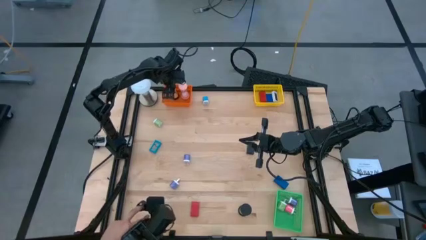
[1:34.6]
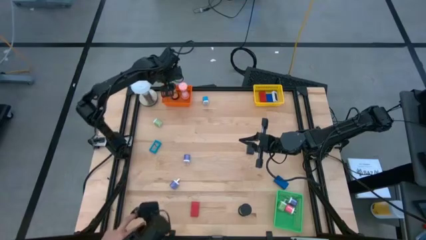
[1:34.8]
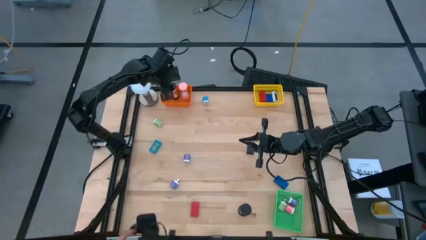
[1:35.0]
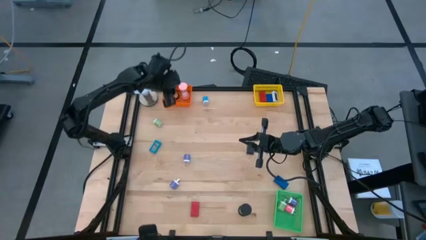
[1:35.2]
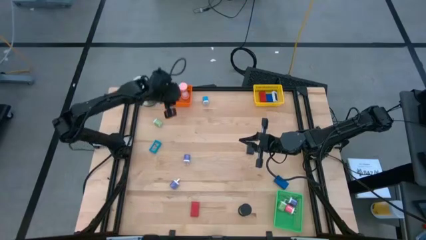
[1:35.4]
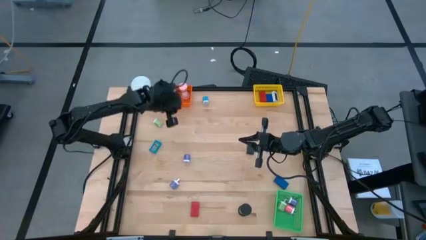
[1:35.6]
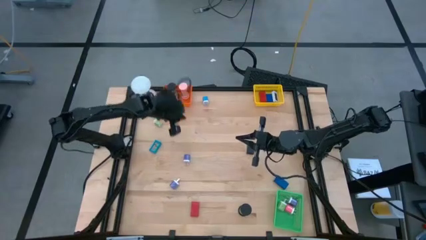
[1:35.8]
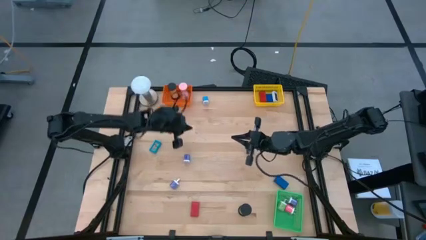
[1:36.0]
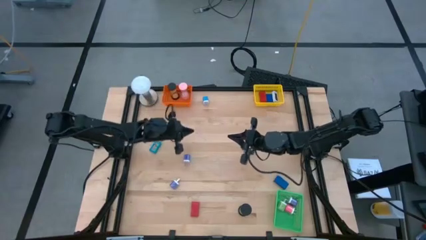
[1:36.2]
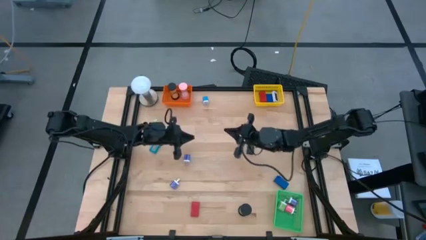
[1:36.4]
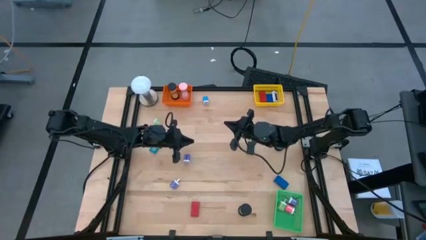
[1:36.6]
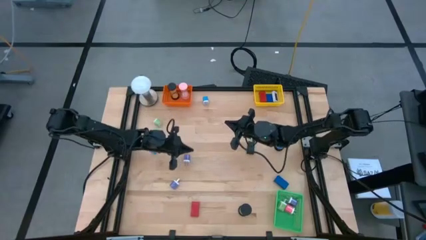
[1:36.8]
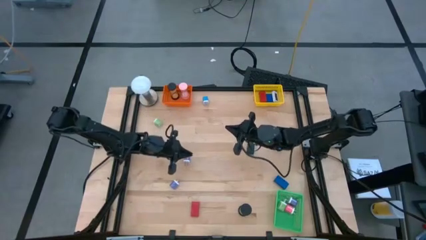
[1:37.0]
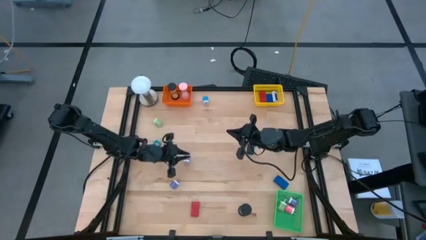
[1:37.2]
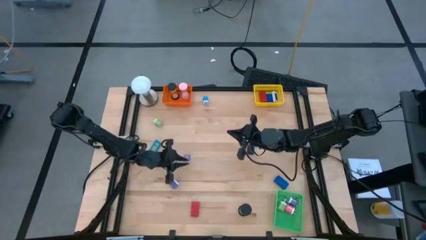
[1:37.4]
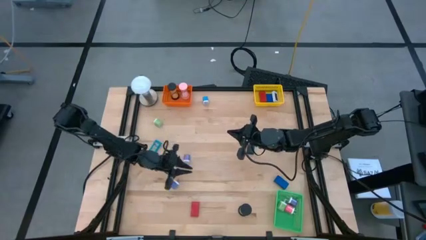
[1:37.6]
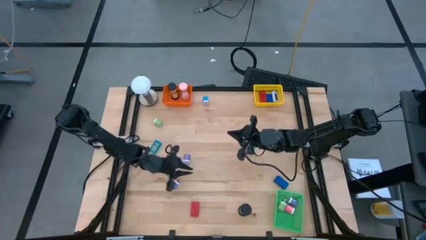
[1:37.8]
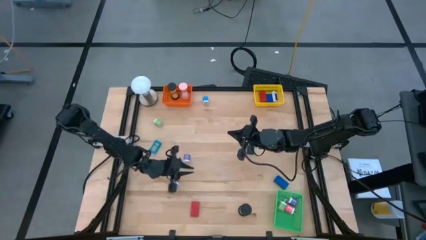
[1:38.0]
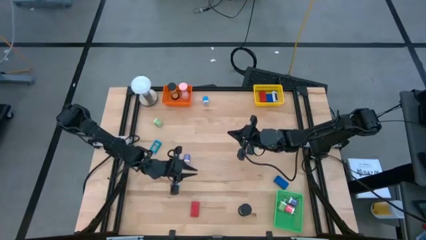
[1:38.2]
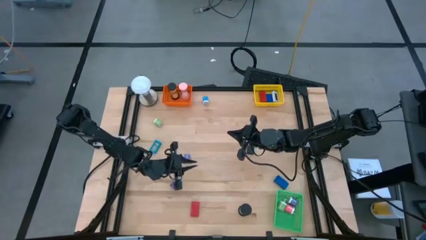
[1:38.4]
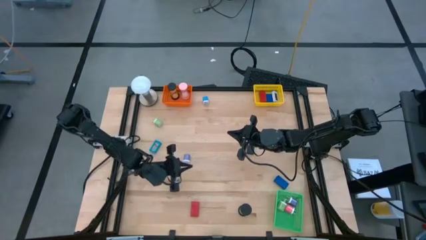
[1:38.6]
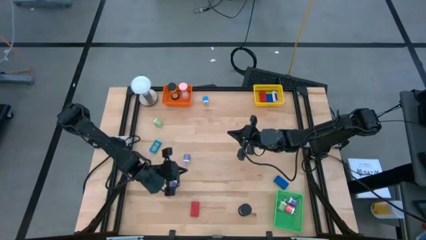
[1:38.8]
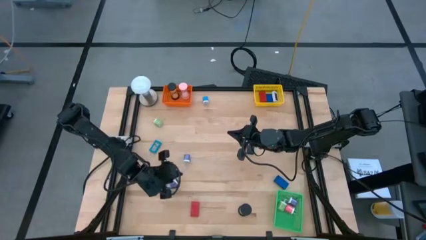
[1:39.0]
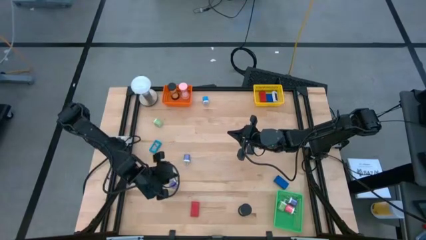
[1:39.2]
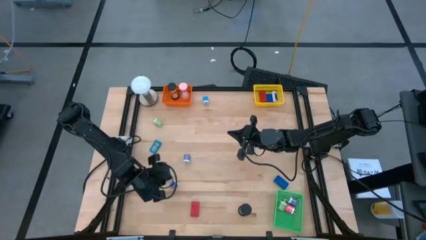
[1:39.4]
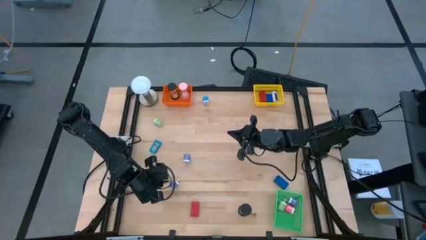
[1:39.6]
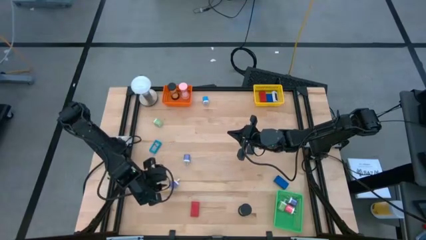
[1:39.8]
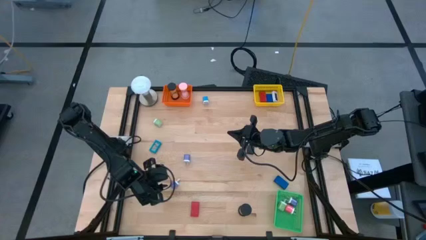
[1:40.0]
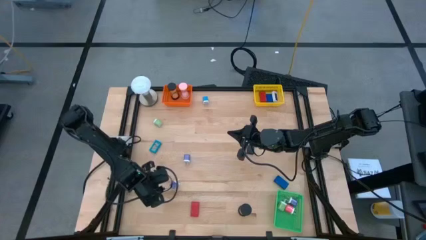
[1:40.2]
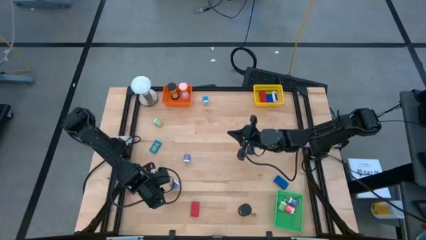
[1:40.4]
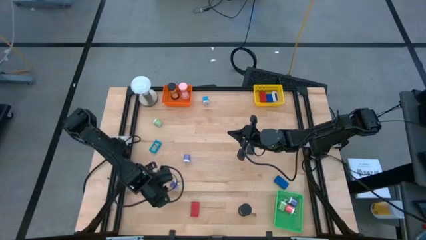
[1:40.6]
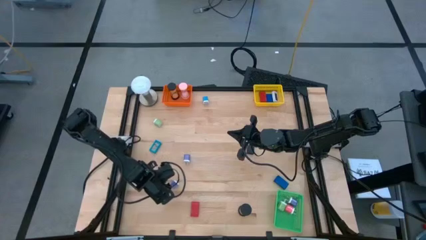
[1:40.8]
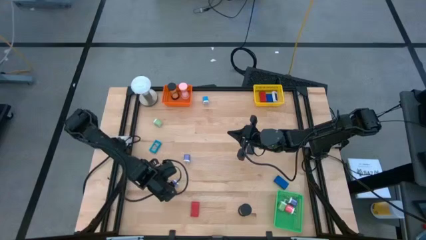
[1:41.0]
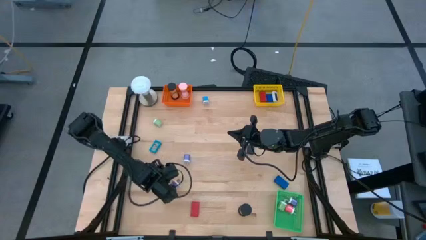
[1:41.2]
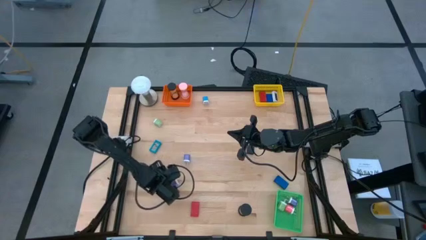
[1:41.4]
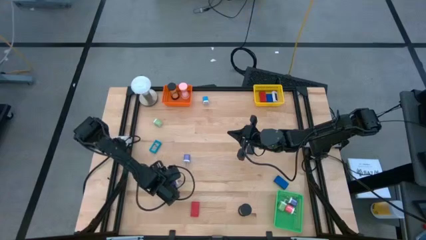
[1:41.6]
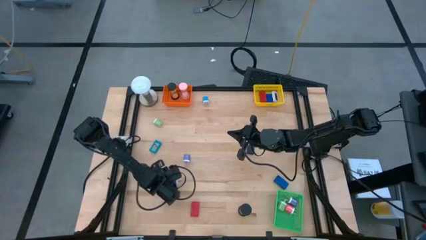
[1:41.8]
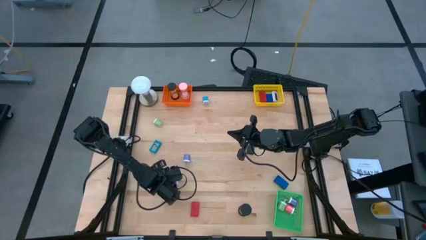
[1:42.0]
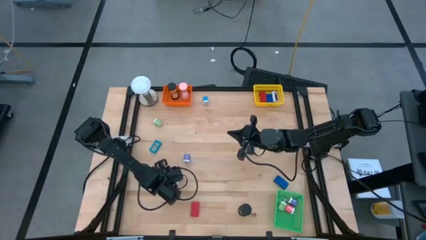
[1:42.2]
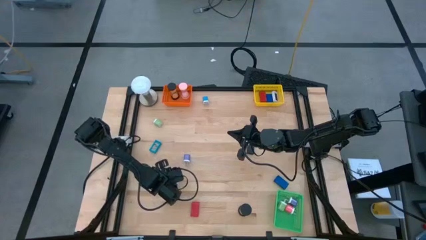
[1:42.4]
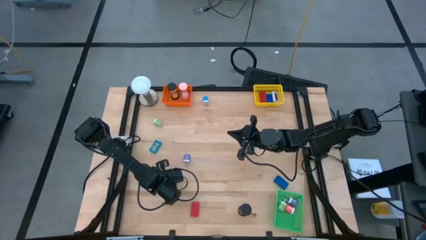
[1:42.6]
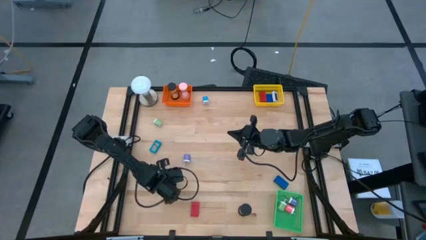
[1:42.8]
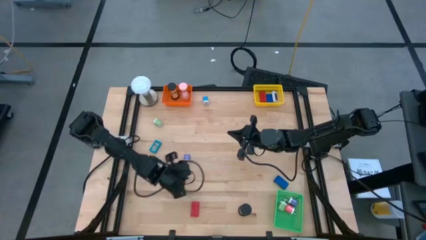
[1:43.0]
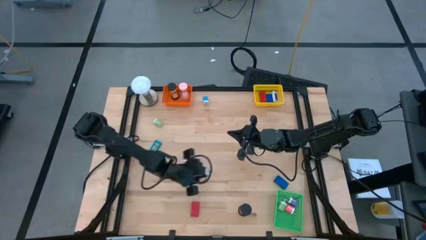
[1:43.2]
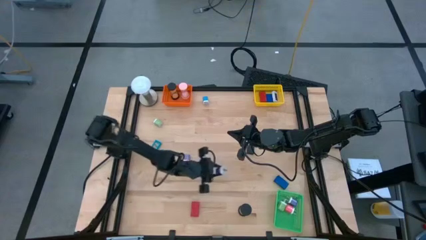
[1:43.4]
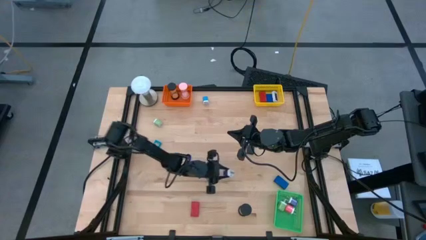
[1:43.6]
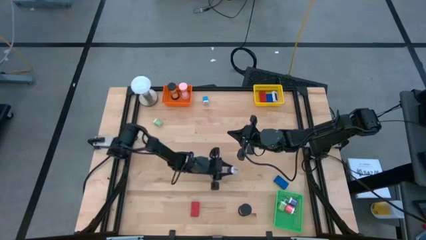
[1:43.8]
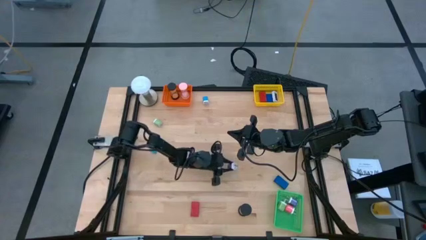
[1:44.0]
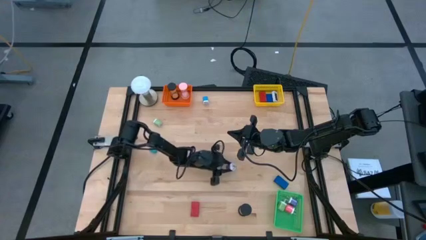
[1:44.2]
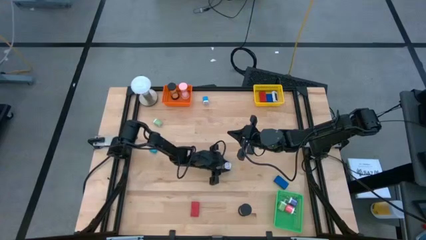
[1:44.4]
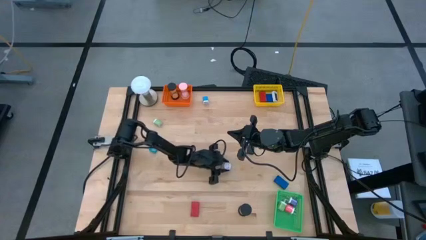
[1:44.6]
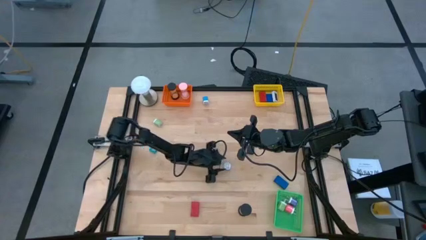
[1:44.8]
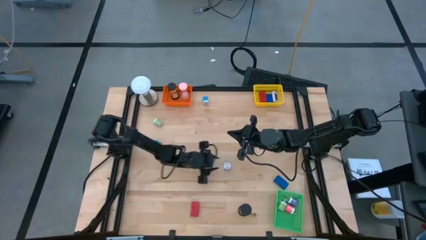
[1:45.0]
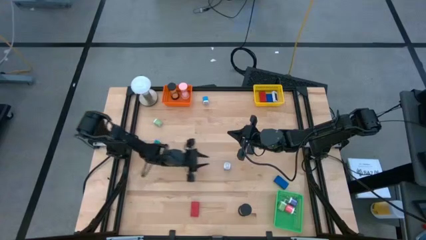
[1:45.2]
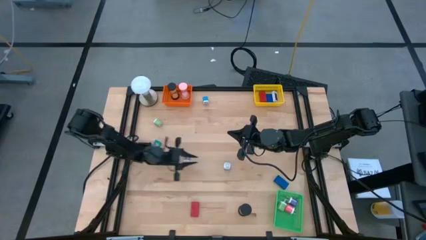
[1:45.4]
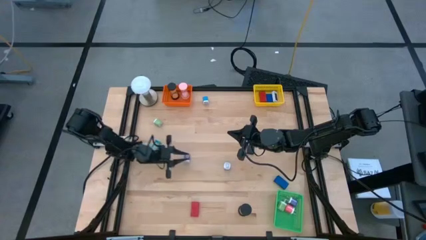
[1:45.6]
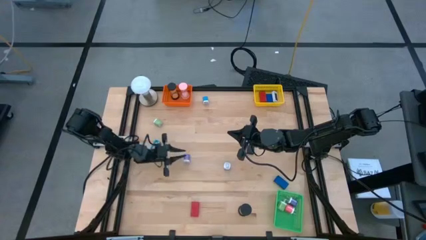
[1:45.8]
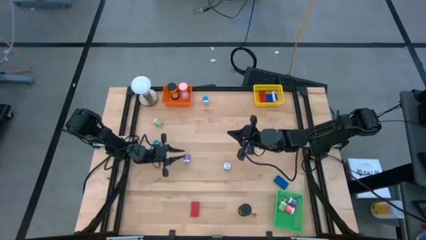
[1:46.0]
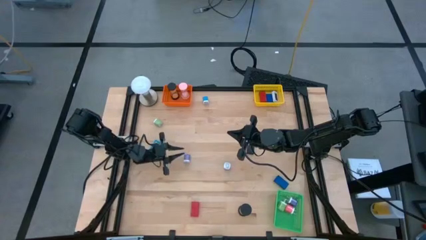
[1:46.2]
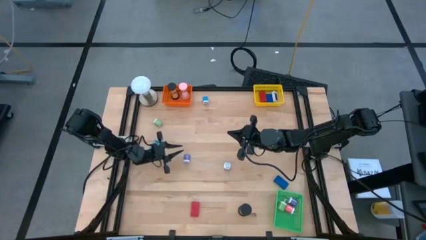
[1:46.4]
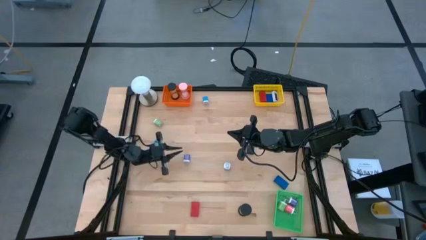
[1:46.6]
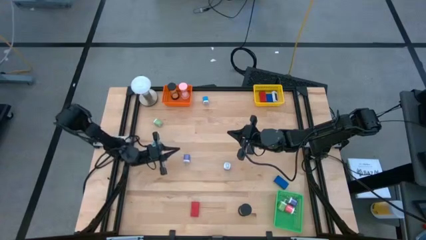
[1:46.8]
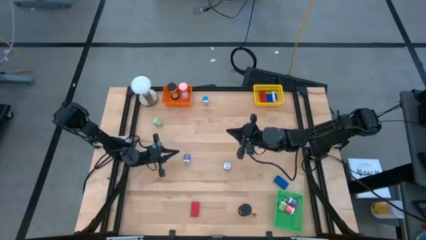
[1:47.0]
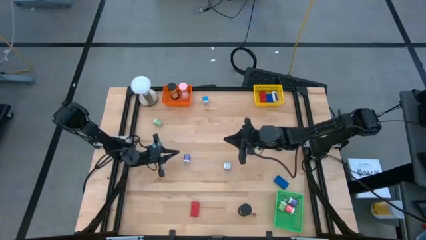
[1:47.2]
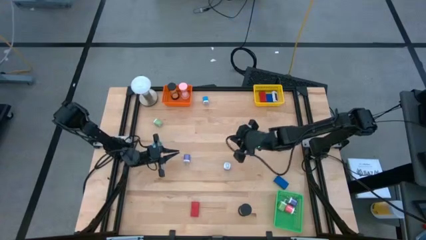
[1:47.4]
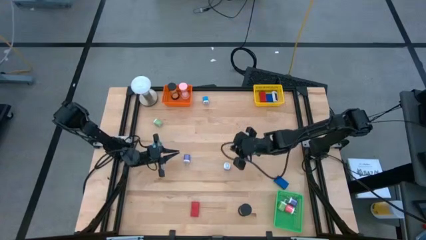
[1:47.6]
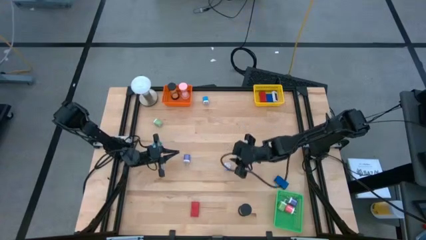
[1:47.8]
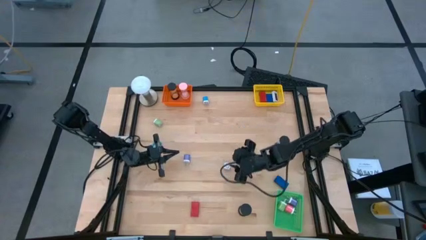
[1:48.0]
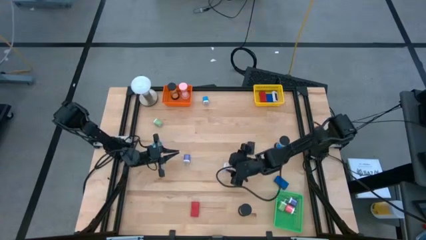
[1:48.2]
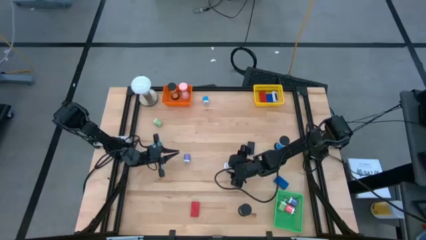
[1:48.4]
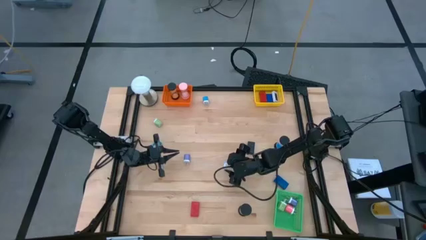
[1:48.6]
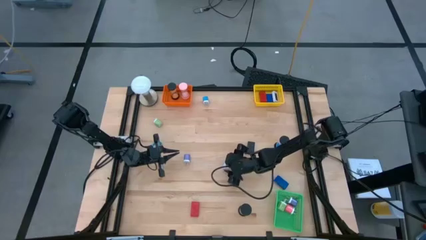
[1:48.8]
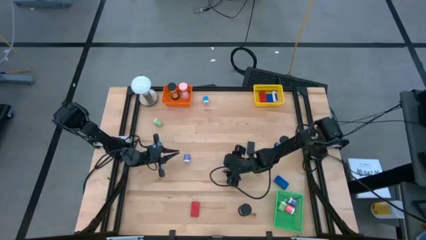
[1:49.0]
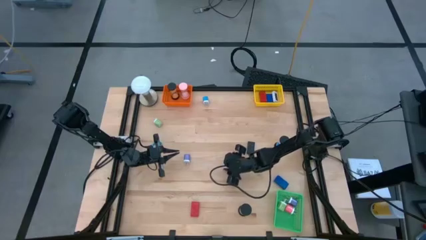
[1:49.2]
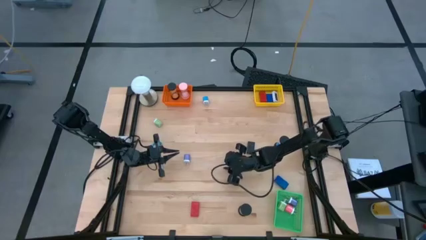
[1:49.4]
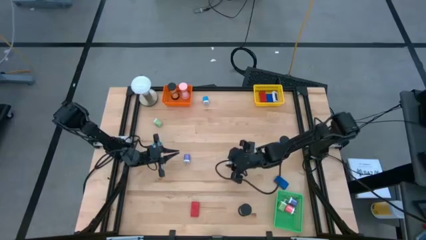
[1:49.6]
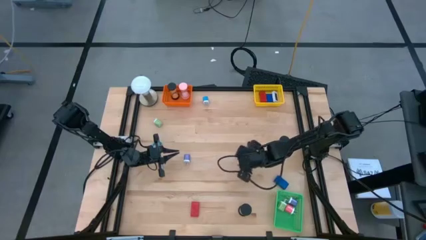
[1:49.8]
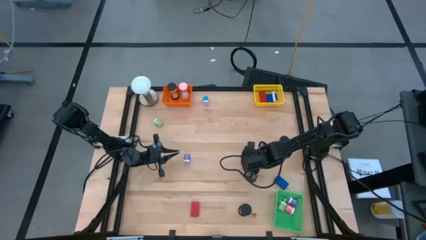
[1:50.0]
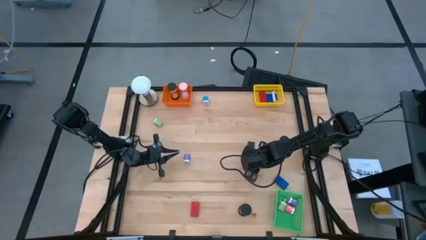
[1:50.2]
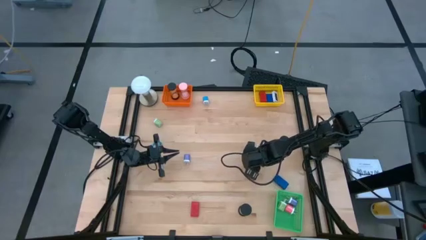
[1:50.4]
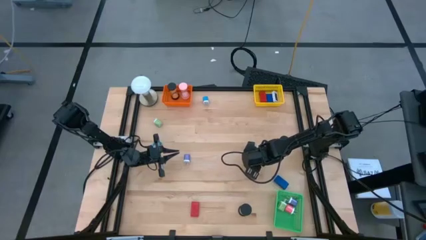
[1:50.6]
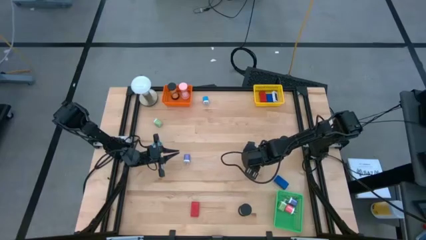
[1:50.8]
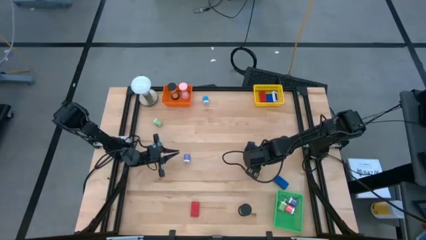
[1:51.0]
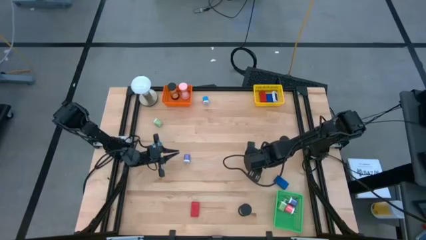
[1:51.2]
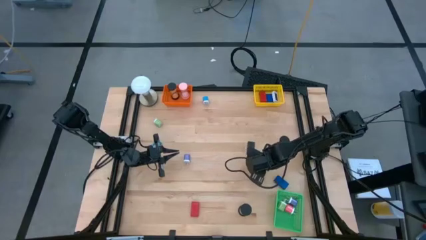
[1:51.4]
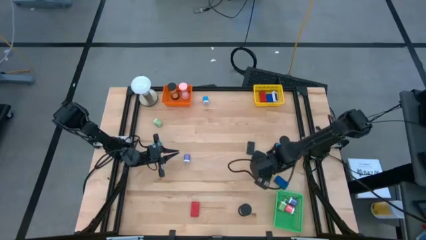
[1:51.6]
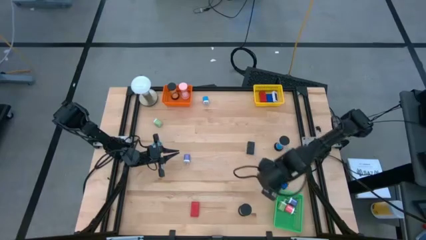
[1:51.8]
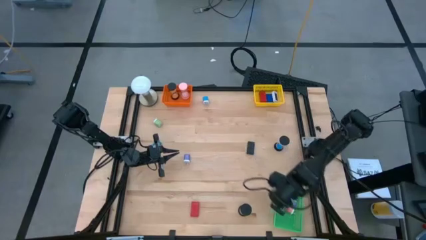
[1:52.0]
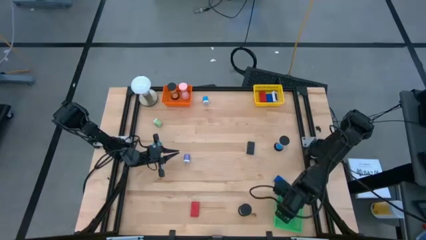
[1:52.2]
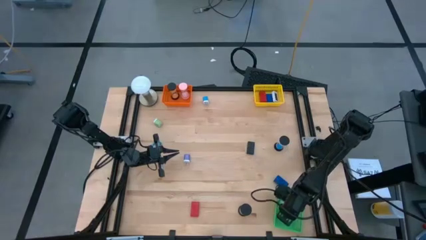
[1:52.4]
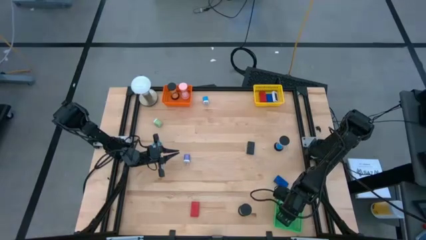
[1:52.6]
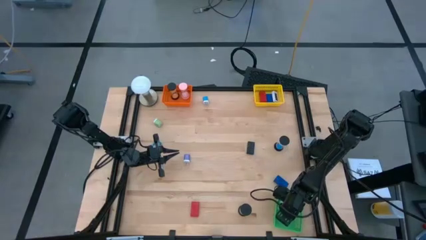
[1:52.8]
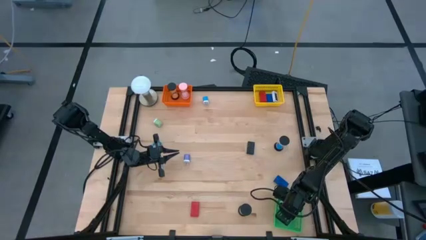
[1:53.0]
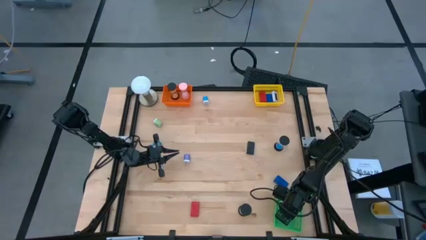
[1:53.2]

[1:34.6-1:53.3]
Task: Pick & Place Office items
Put the bottom purple charger adapter into the green basket
